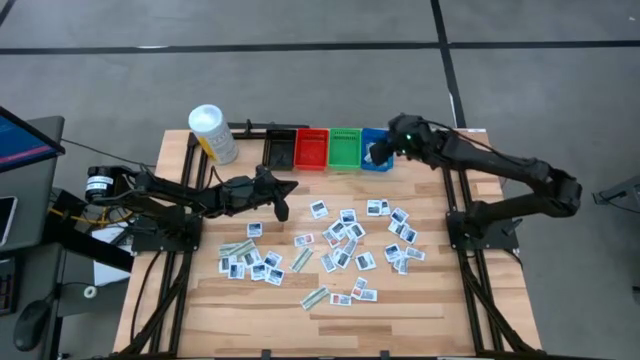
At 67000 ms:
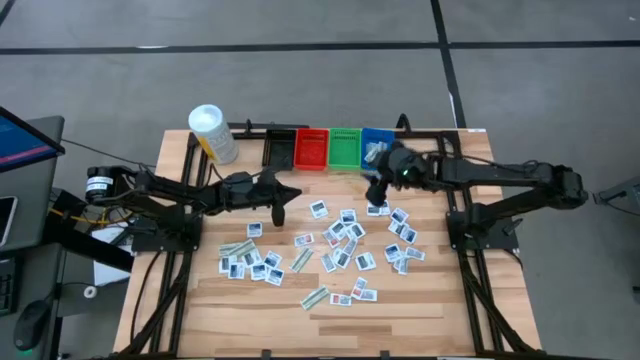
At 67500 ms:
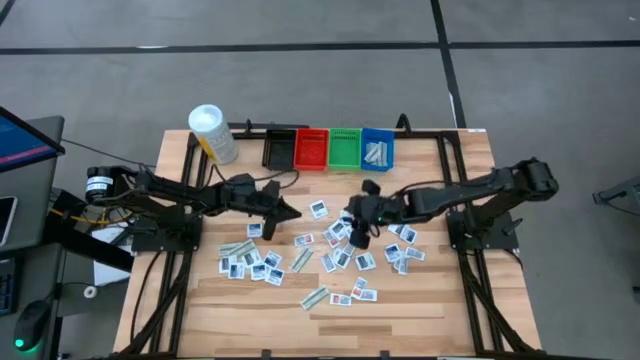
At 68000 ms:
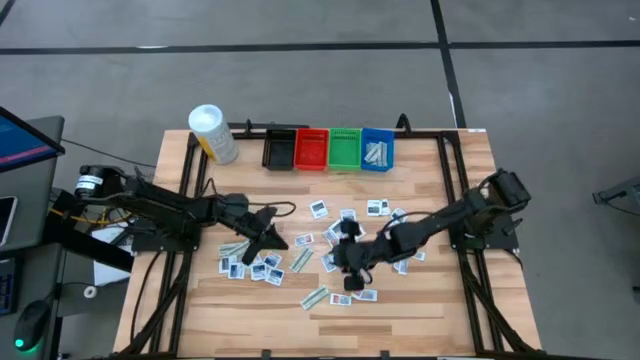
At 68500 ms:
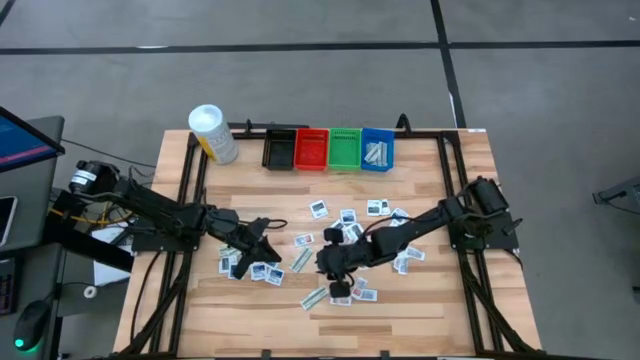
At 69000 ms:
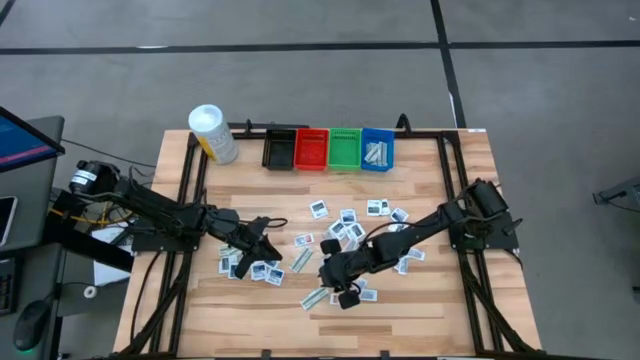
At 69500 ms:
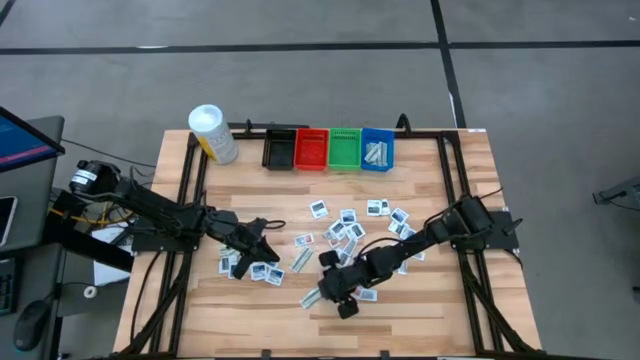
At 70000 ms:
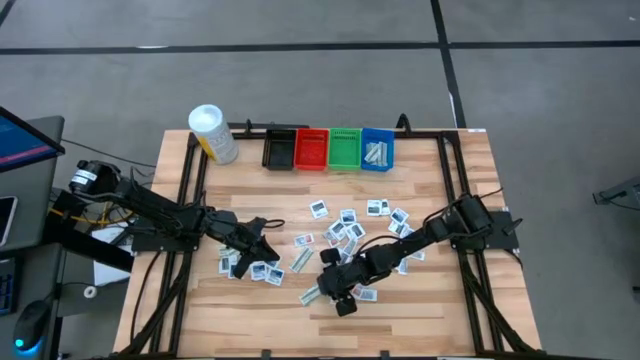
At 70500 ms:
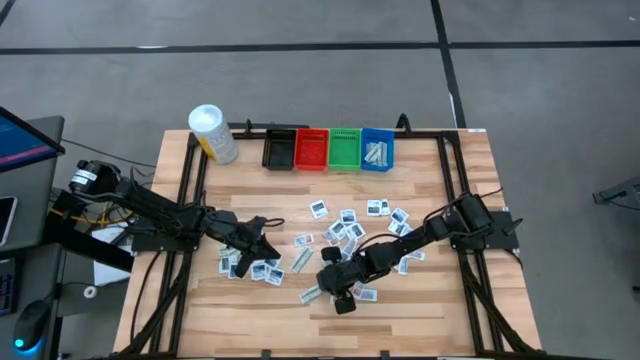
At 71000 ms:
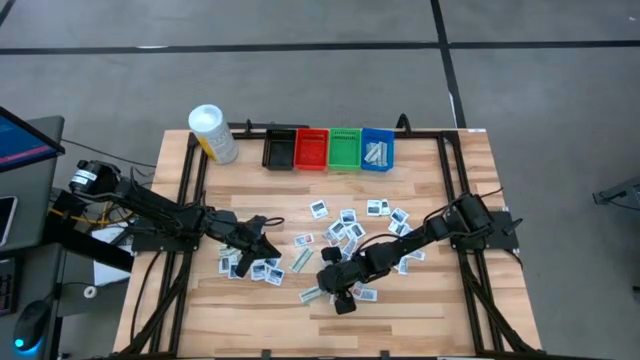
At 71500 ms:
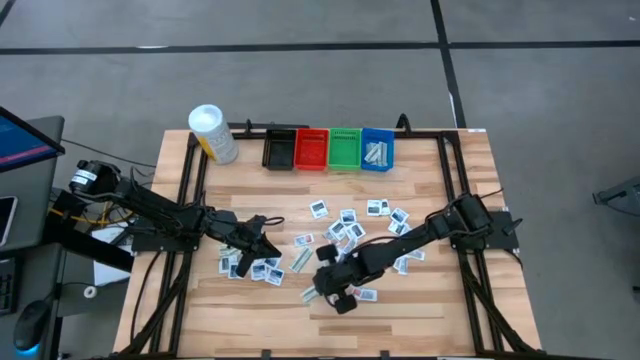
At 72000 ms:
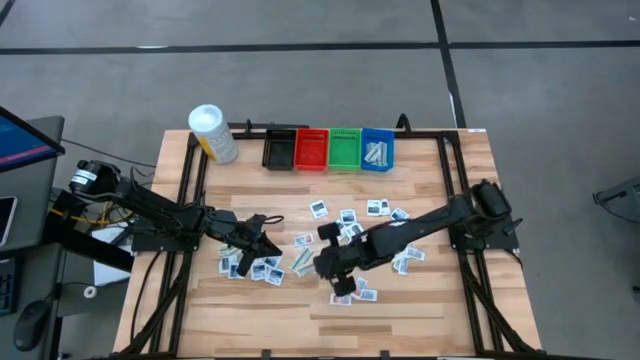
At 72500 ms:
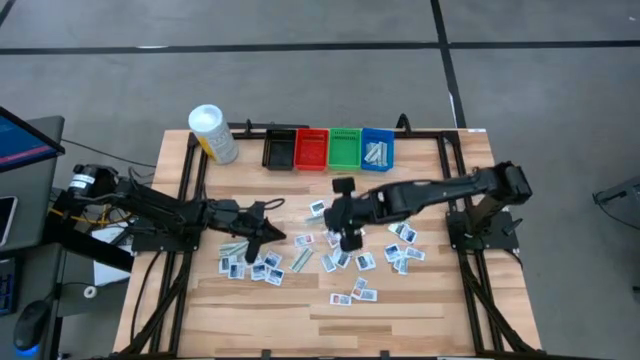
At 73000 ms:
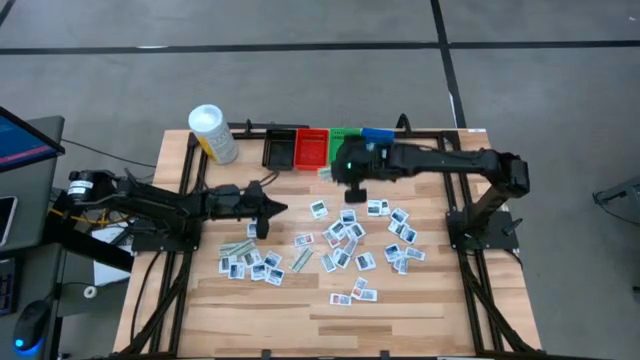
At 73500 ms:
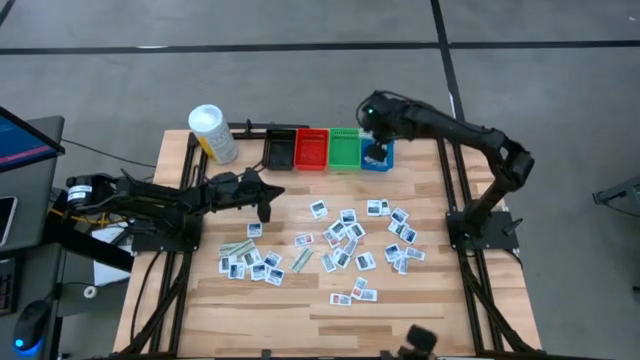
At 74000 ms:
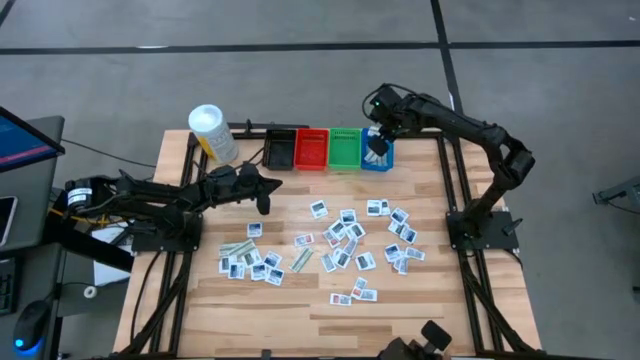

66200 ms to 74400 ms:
Task: Pick & Place First Aid Supplies
Put the bandage pack into the blue bin

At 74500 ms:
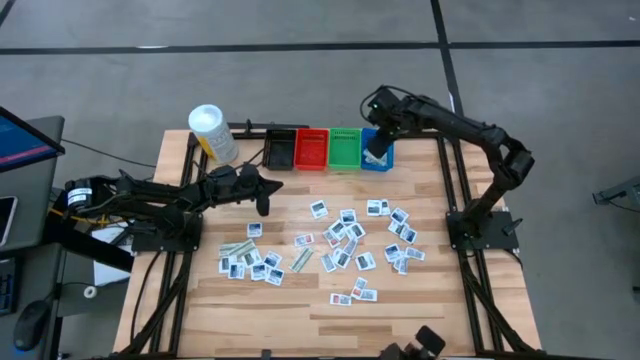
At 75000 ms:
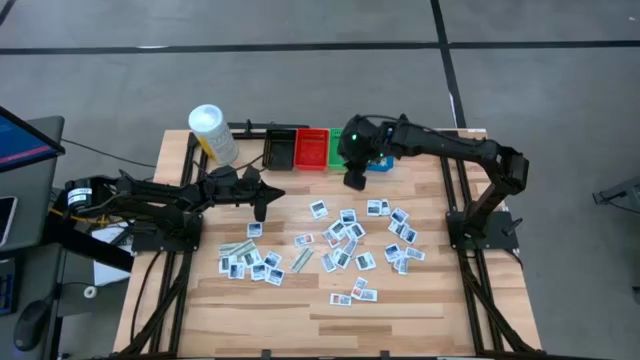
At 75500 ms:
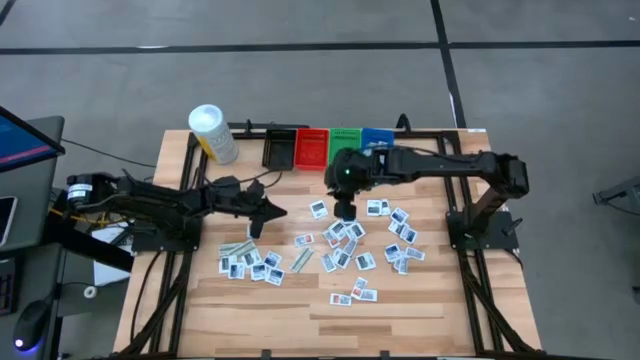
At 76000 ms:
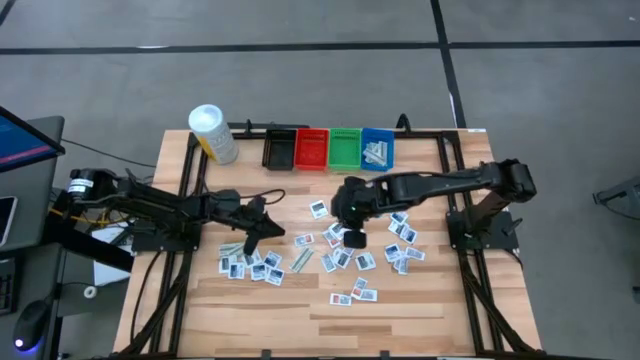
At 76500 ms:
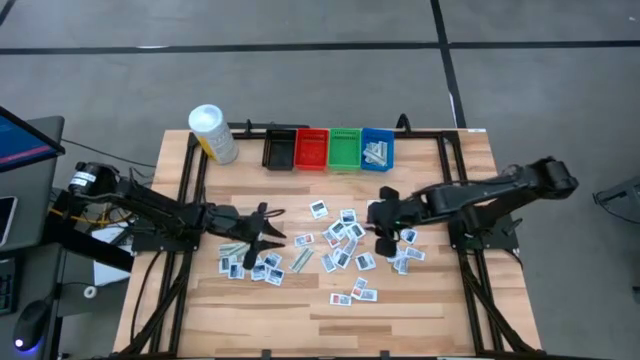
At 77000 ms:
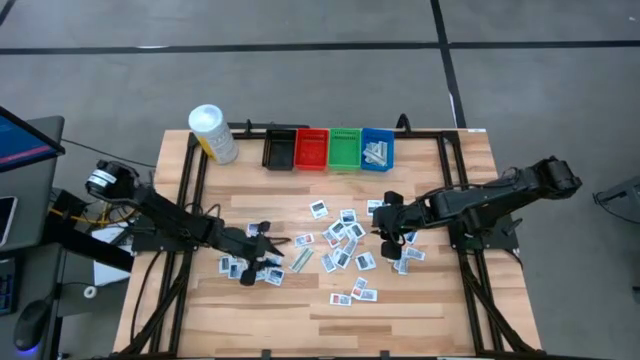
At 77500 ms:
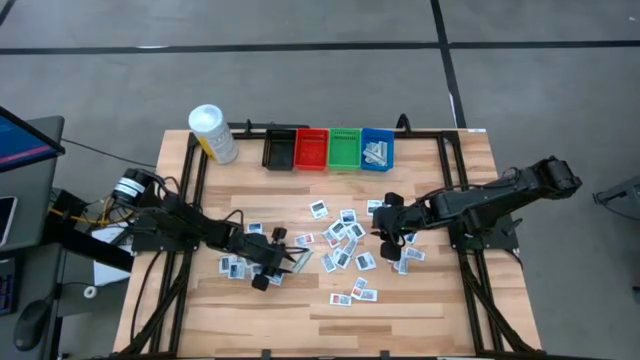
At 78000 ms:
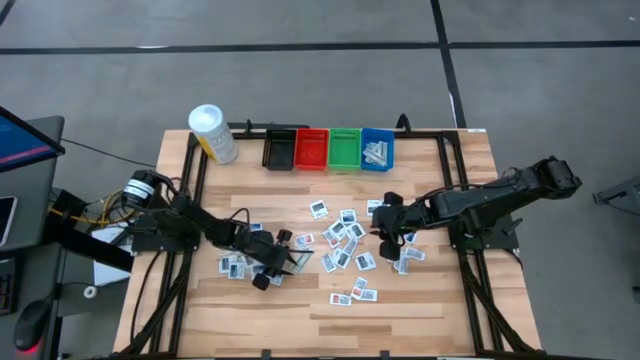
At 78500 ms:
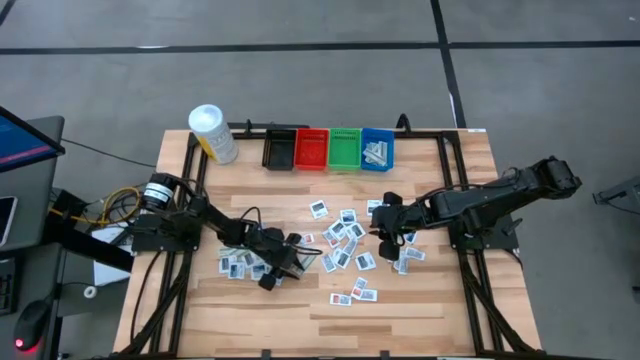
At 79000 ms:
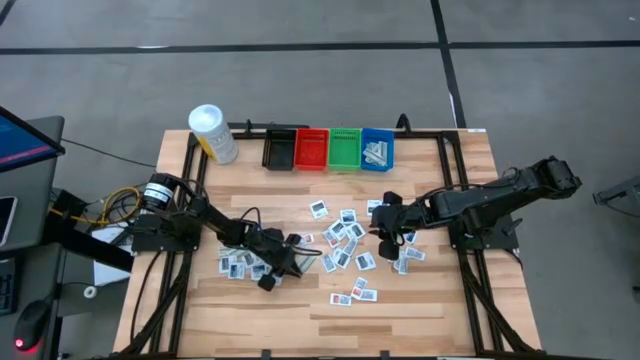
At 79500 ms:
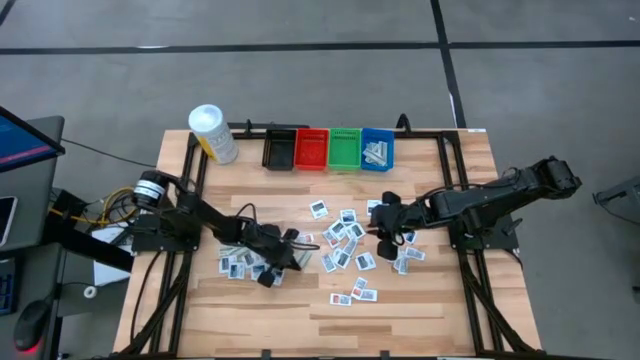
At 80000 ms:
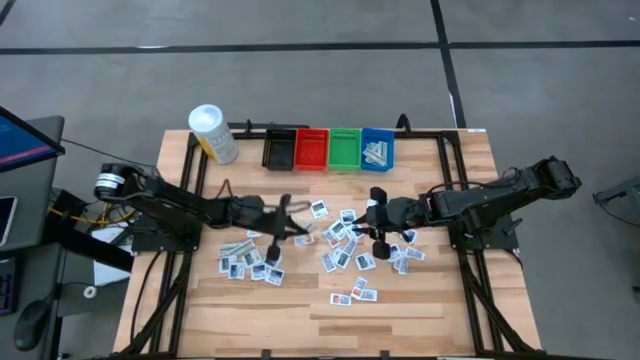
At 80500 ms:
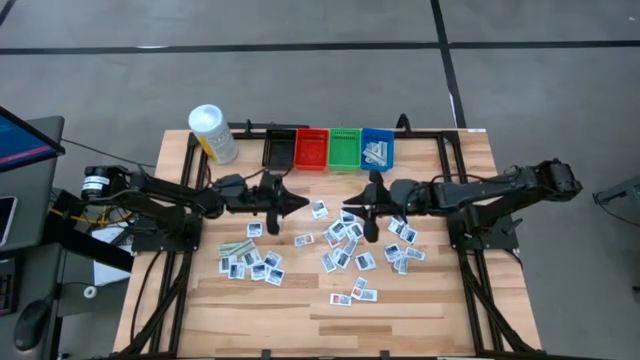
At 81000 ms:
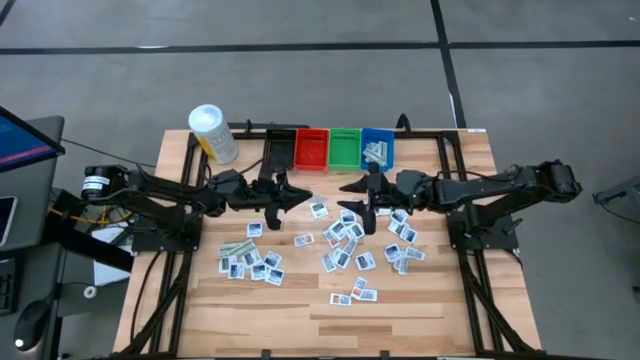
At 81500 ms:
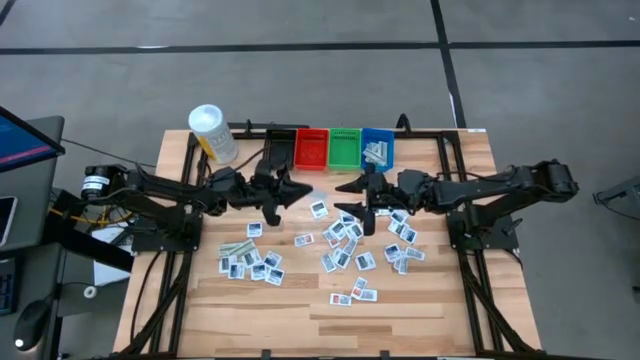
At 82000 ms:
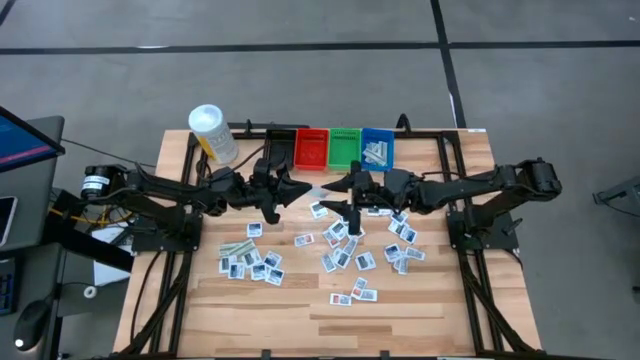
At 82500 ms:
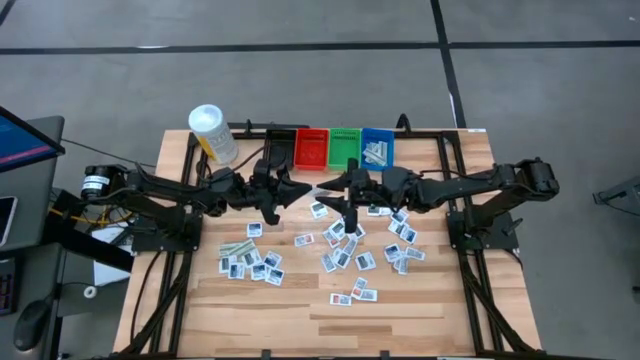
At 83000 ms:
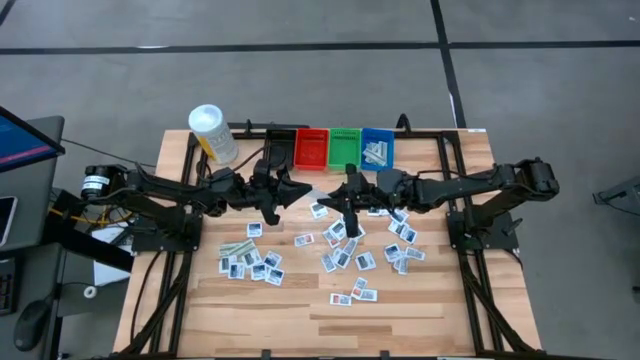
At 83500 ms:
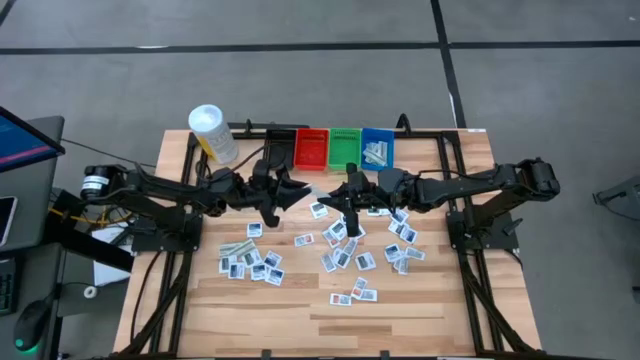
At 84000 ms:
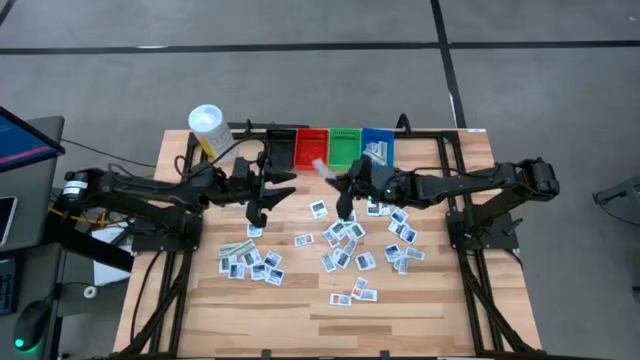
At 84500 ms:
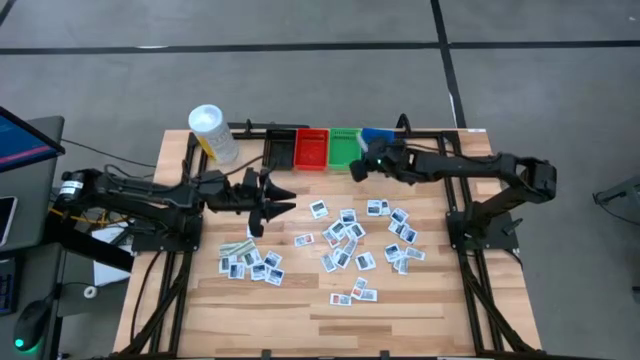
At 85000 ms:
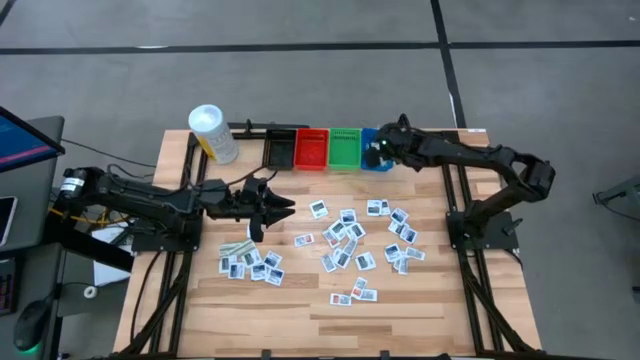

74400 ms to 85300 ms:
Put the right bandage pack into the blue bin

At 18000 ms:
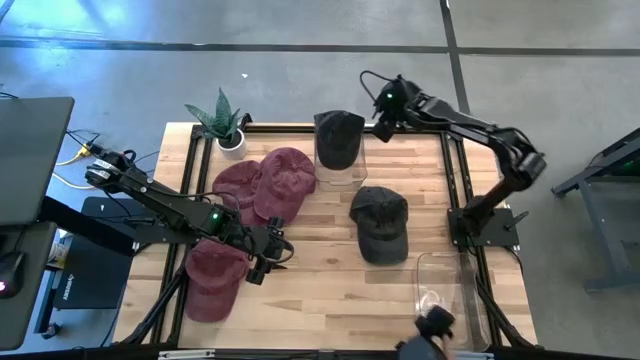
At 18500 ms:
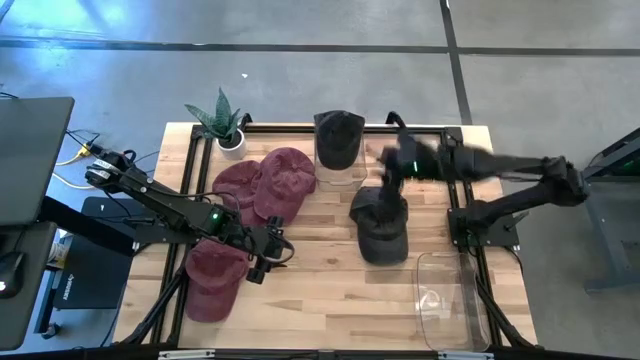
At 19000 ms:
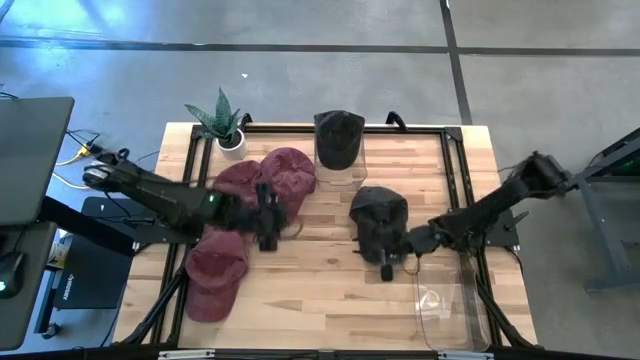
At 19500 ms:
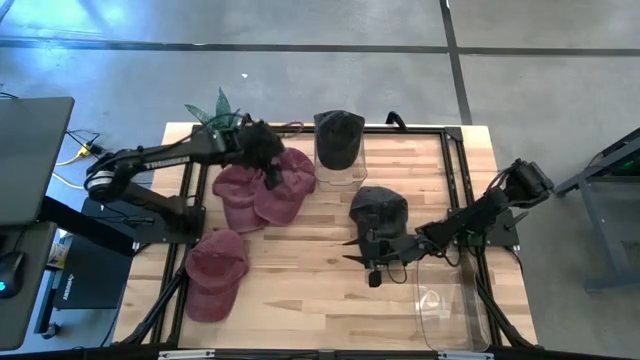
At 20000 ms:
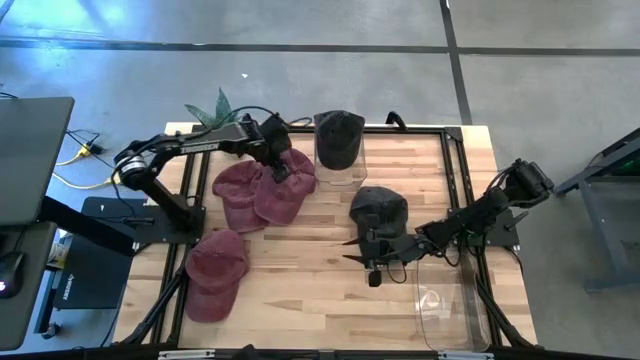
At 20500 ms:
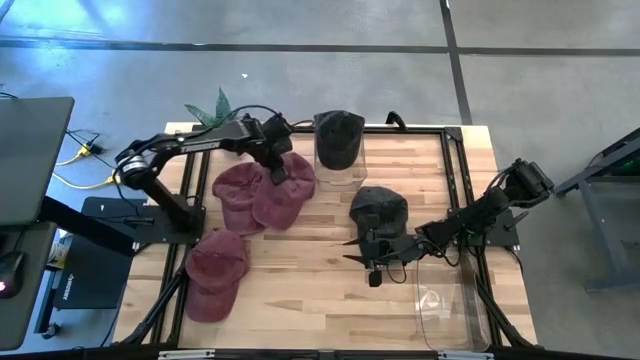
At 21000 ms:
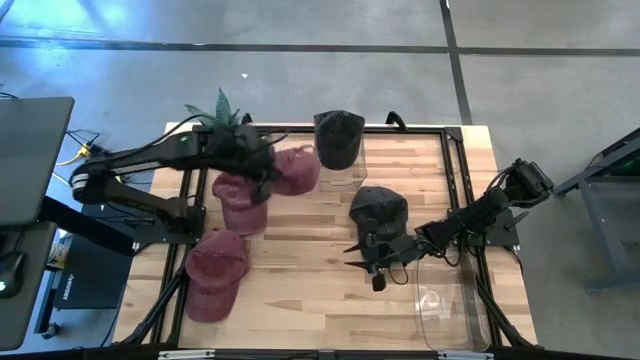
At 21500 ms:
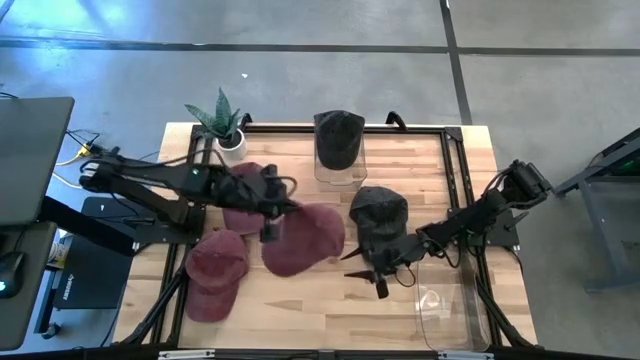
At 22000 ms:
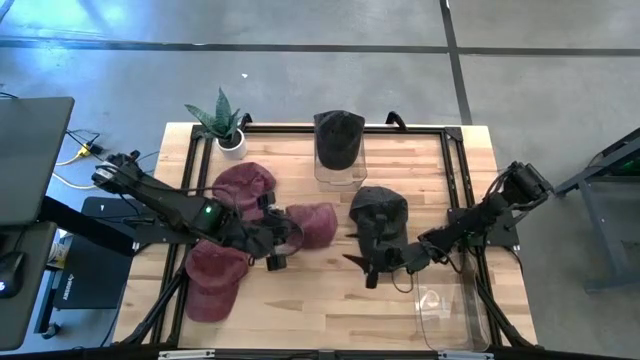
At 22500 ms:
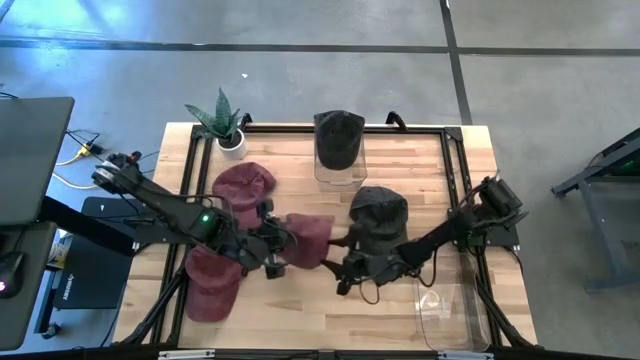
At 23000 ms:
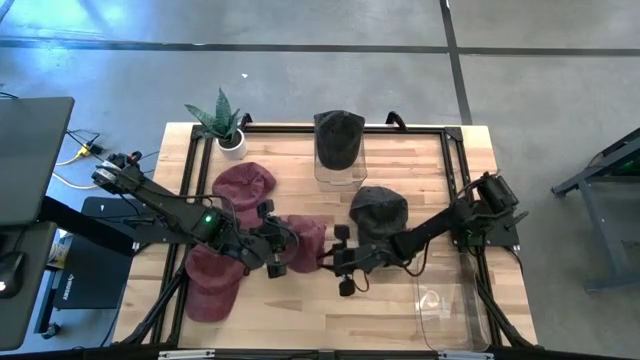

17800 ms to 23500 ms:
Task: Pick & Place hat
Put the top right red cap into the bottom transparent bin
